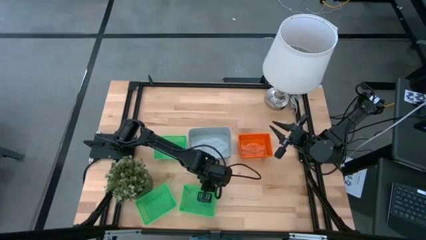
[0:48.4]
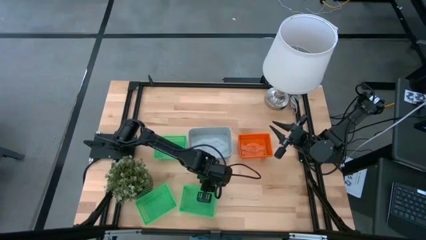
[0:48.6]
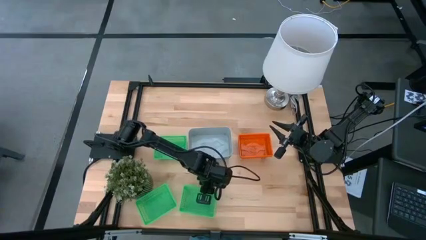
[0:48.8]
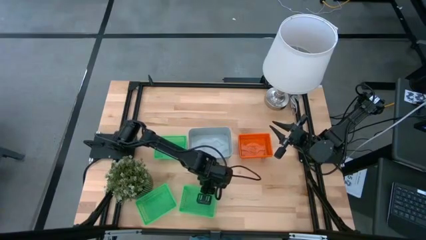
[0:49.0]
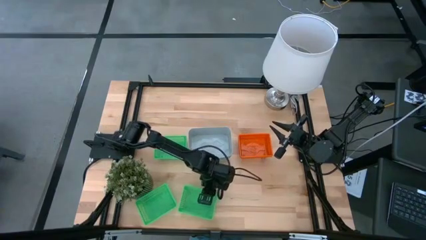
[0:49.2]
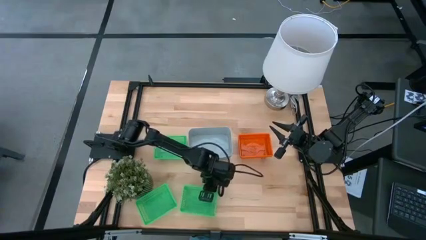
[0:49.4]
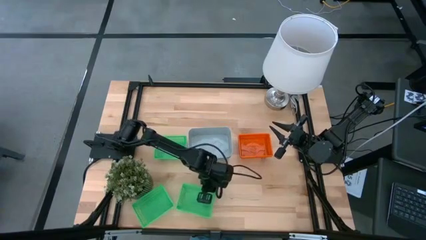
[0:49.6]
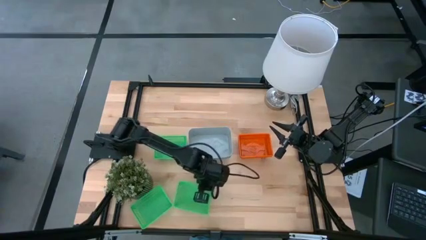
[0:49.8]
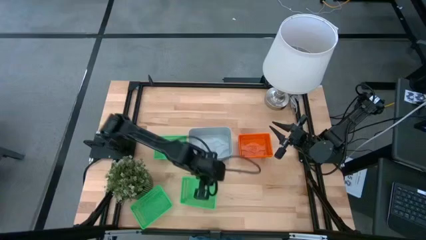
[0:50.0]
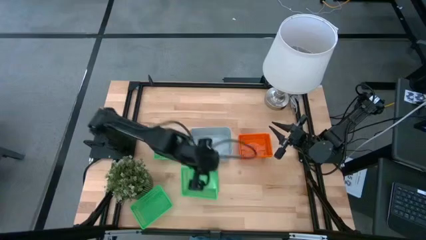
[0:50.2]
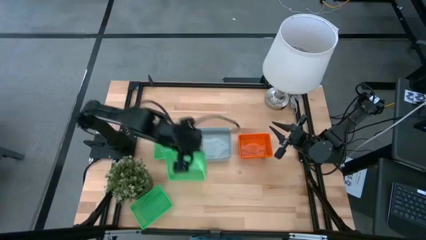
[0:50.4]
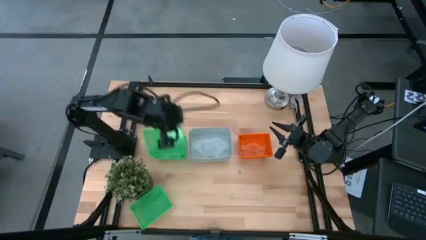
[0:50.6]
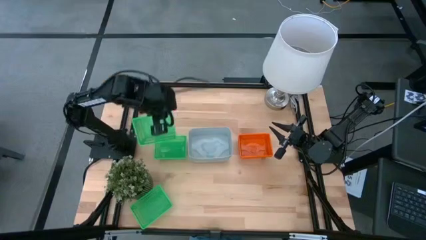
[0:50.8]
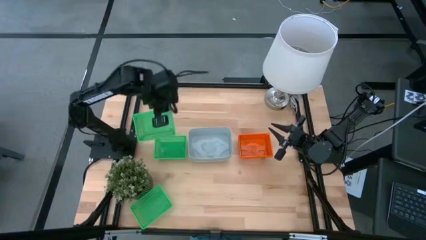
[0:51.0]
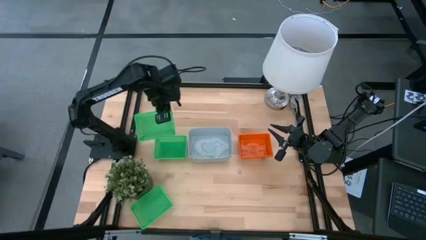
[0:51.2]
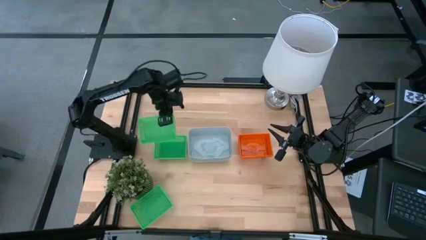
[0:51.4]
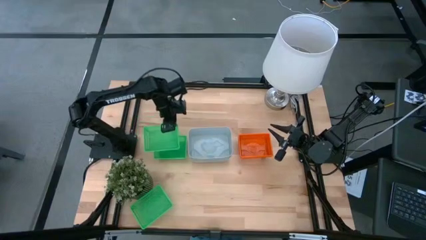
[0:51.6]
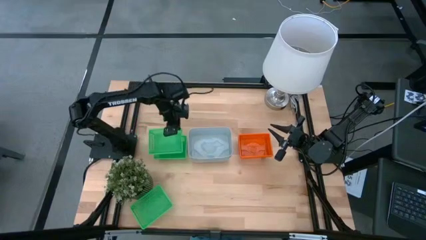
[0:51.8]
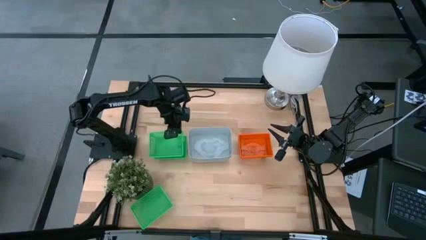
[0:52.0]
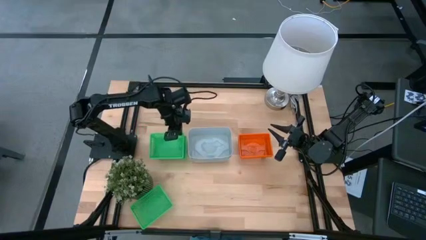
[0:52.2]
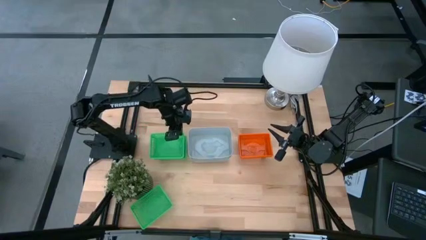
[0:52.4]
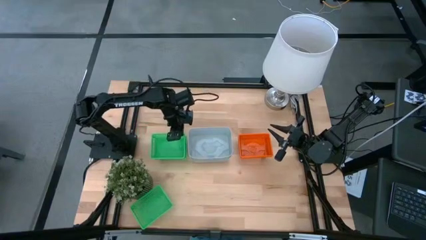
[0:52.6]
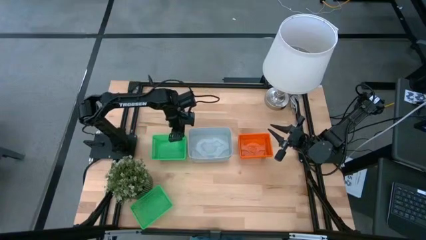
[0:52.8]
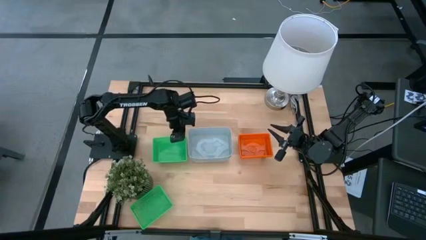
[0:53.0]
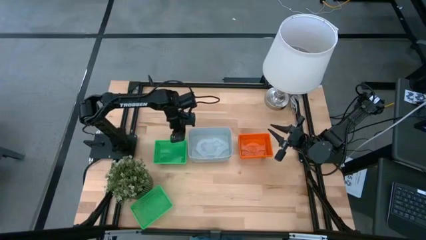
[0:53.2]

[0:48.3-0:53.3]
Stack the bottom right green bin on top of the top green bin

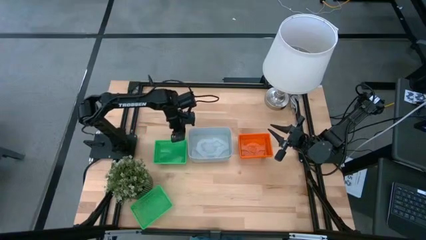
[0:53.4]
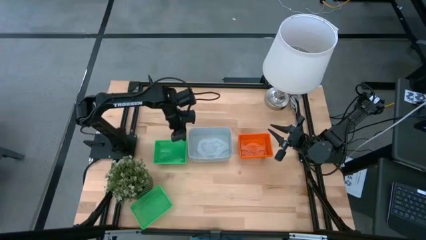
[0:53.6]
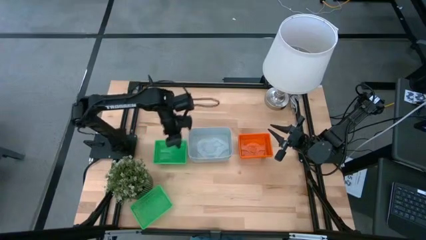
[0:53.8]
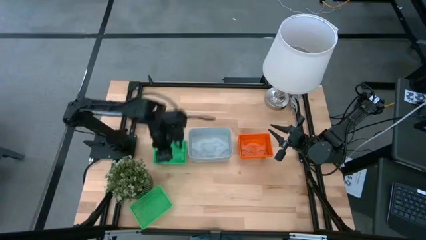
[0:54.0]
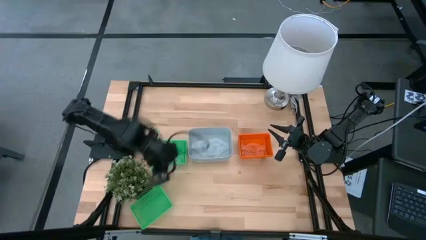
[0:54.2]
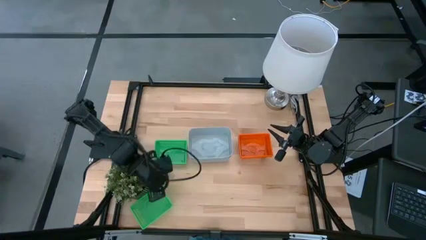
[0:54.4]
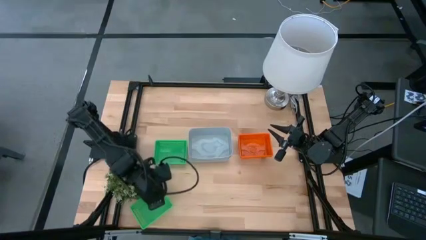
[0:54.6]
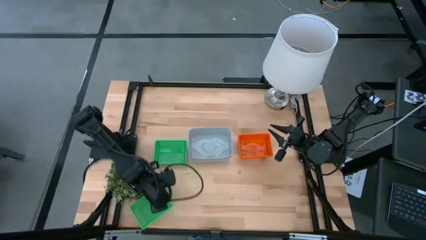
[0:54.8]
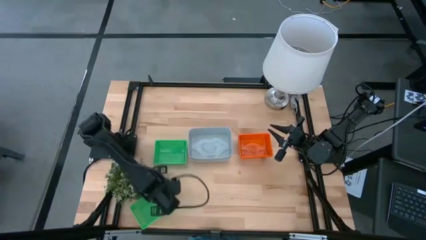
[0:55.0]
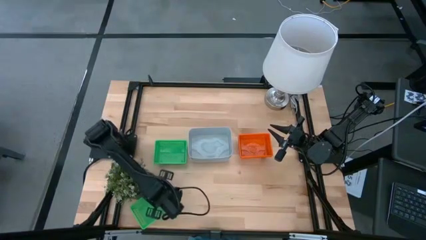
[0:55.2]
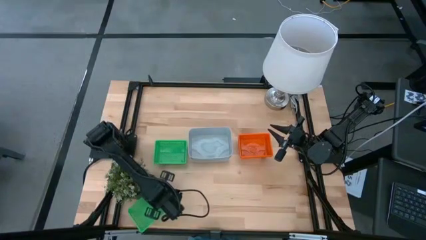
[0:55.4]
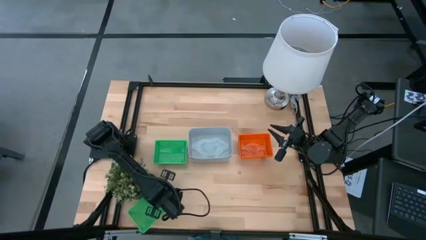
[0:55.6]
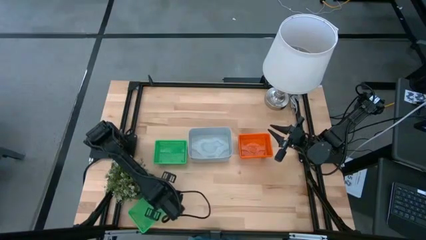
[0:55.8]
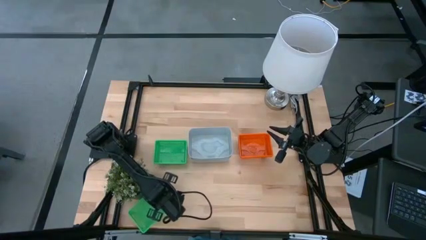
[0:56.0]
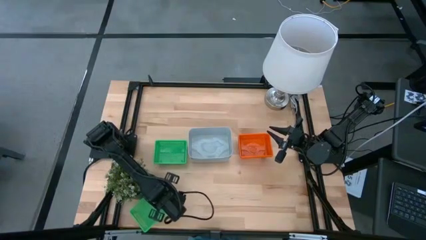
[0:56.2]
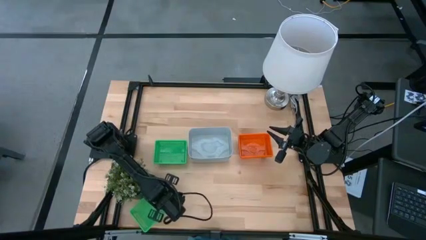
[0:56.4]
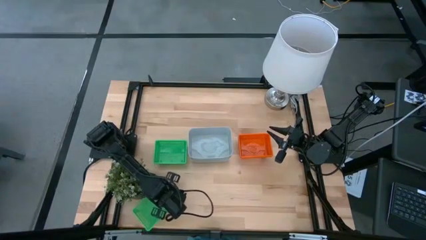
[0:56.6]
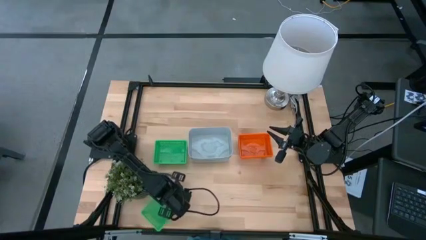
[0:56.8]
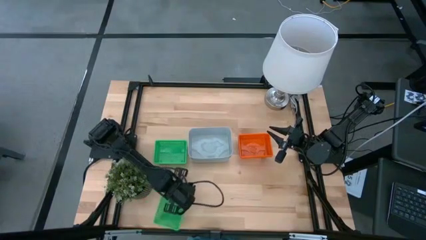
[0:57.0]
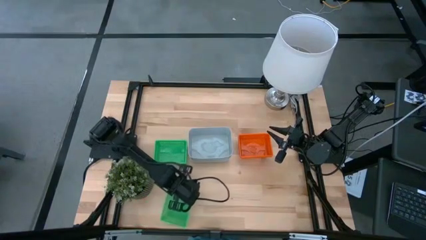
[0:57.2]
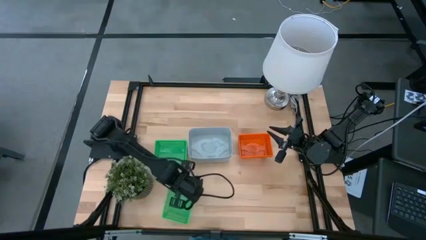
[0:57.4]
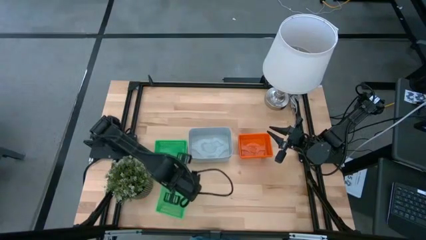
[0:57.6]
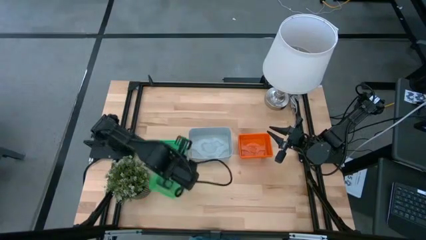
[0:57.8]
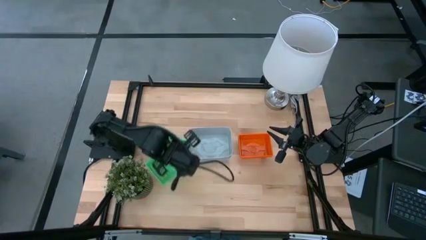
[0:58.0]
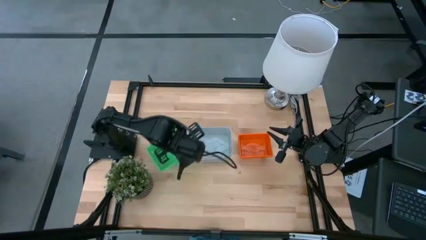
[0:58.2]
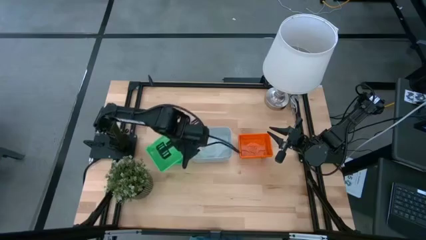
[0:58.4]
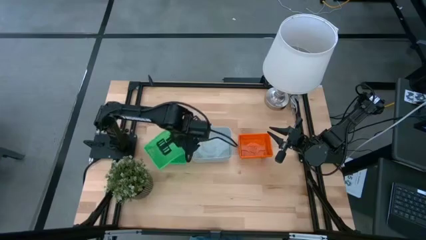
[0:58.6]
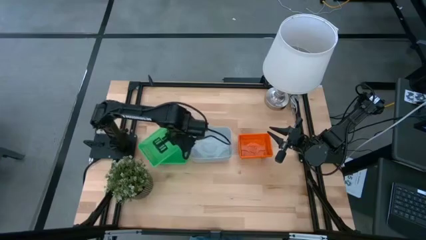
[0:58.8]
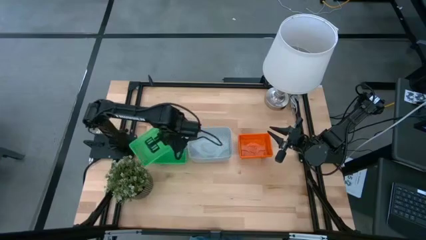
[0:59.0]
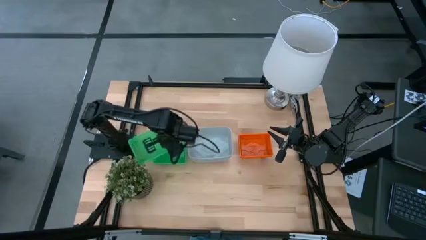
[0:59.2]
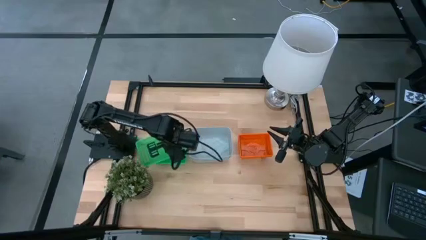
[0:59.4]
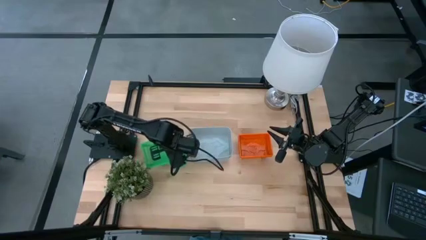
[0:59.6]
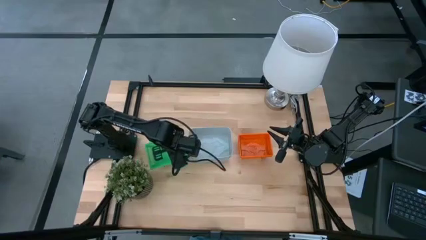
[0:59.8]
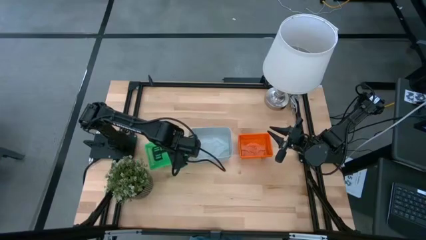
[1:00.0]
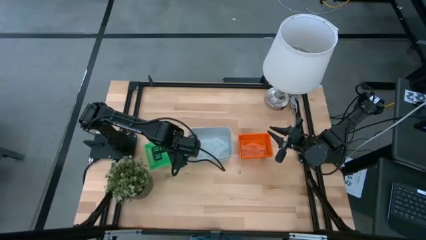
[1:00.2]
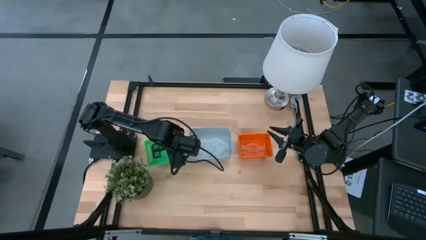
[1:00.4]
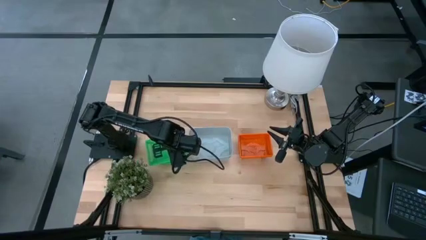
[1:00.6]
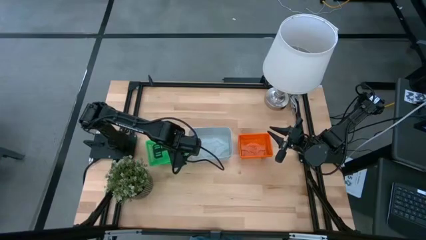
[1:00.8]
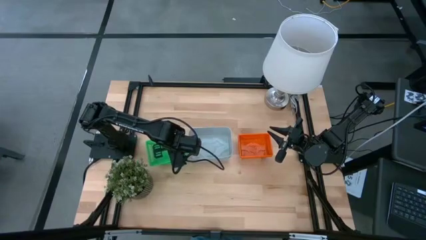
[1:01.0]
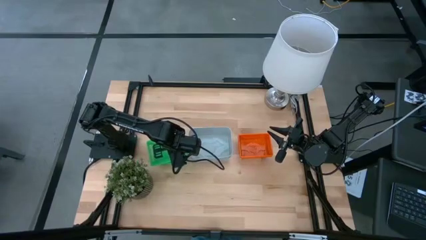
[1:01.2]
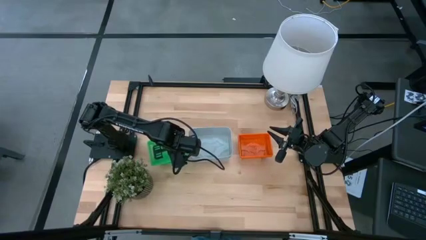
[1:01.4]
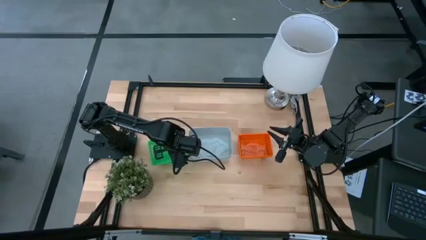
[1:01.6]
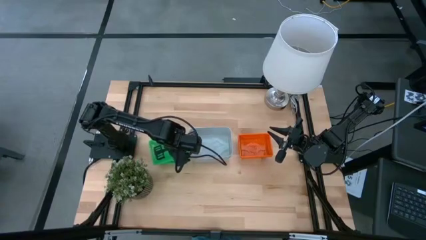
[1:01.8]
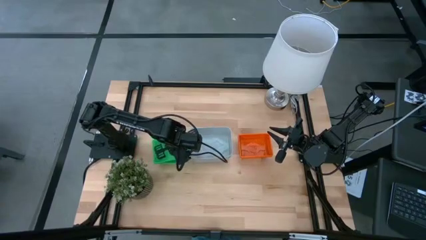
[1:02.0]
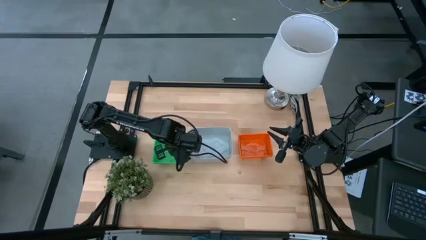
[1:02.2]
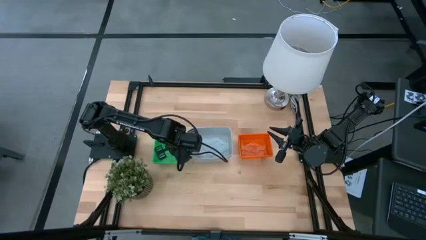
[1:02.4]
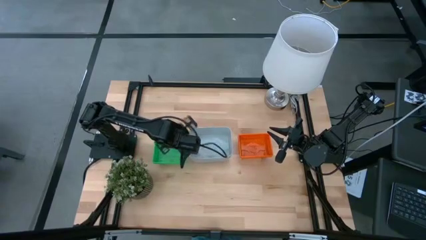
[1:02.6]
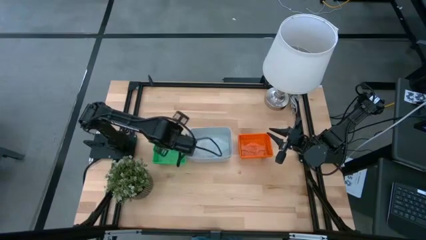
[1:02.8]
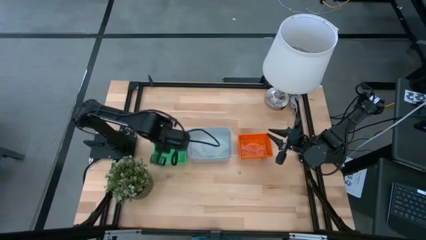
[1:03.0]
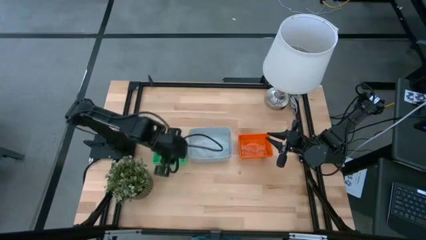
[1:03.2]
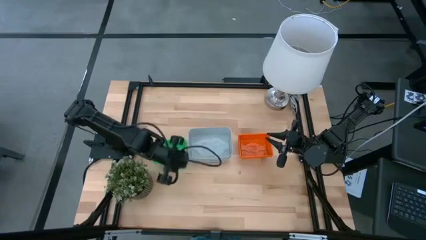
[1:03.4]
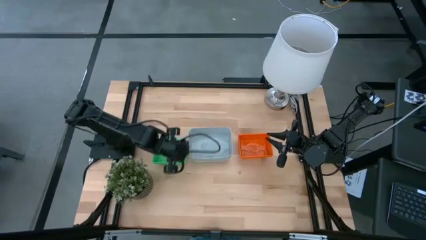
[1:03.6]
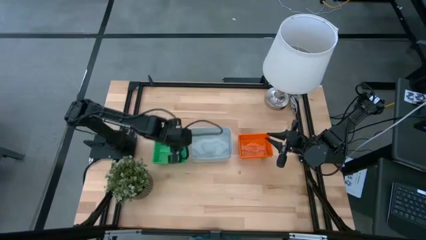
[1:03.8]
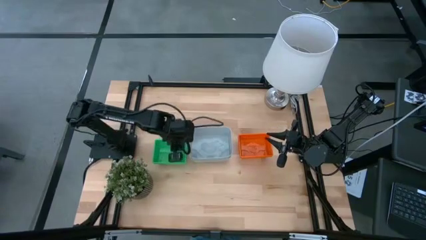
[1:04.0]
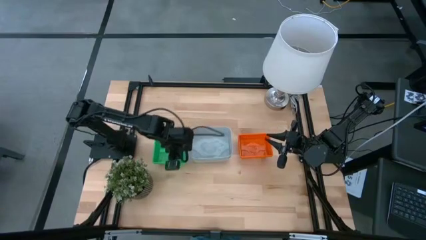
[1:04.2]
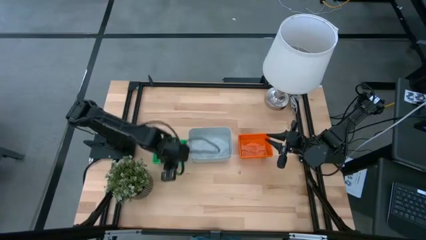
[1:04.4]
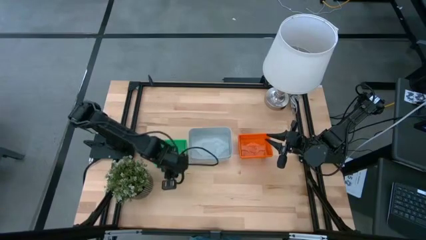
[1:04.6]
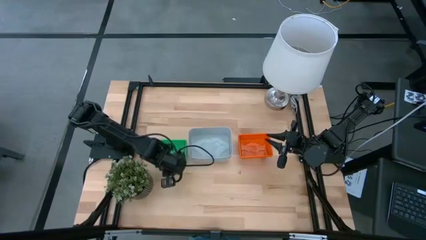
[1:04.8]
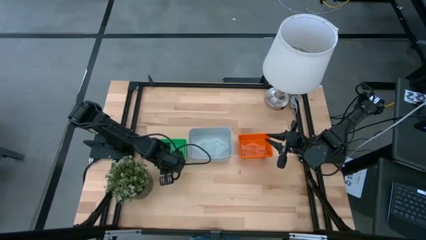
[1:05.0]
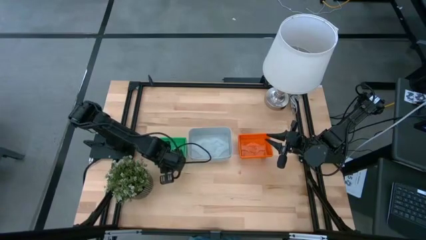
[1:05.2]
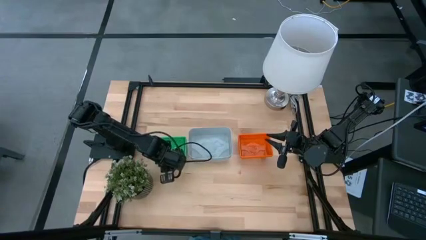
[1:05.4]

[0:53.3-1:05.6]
Stack the bottom right green bin on top of the top green bin
